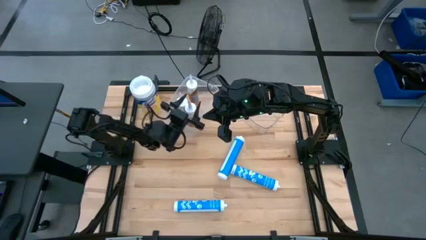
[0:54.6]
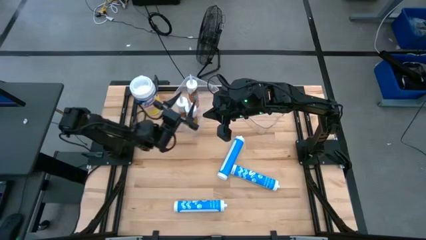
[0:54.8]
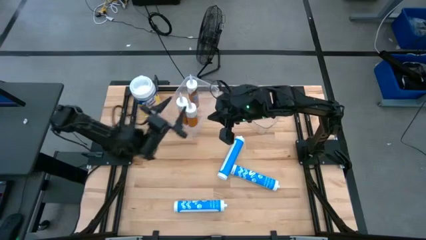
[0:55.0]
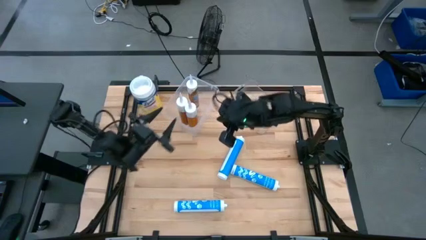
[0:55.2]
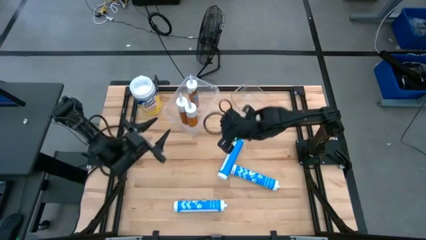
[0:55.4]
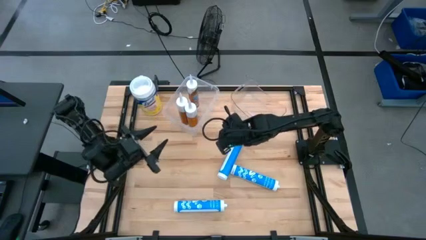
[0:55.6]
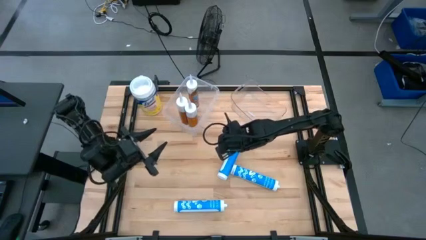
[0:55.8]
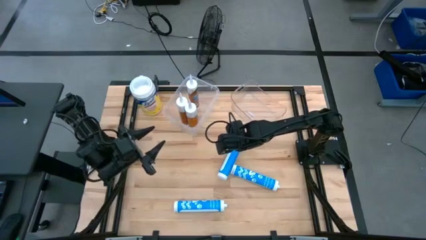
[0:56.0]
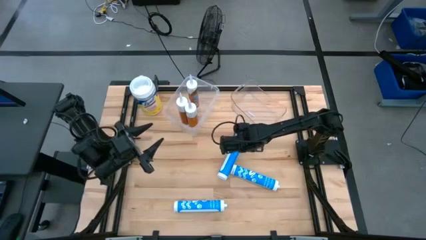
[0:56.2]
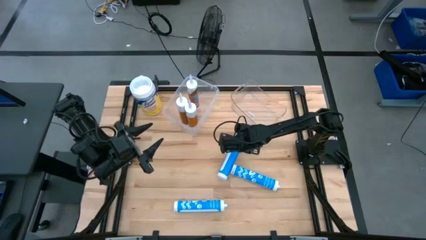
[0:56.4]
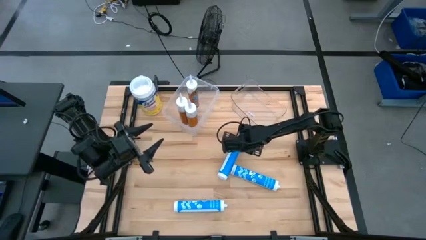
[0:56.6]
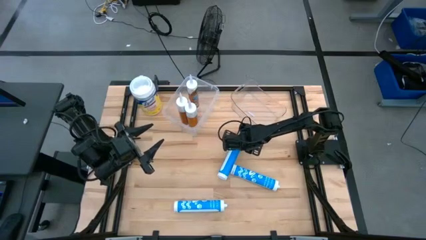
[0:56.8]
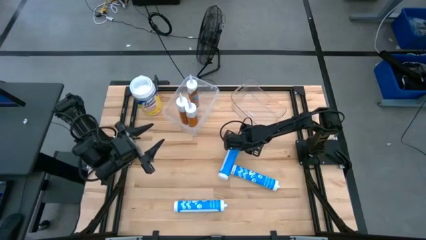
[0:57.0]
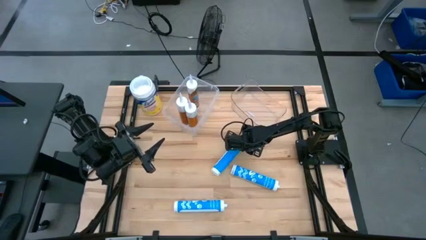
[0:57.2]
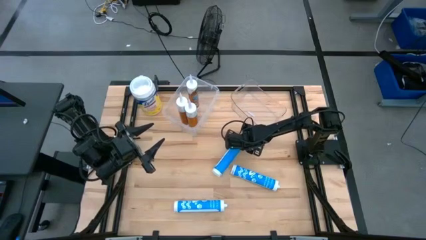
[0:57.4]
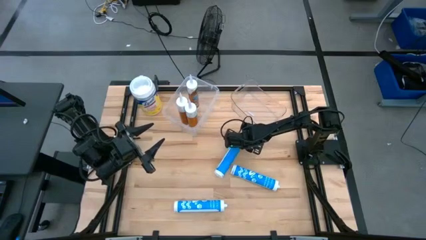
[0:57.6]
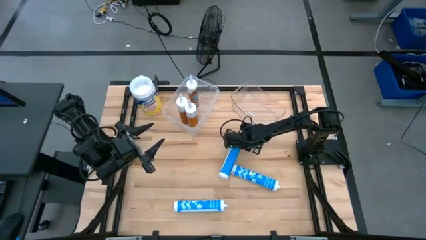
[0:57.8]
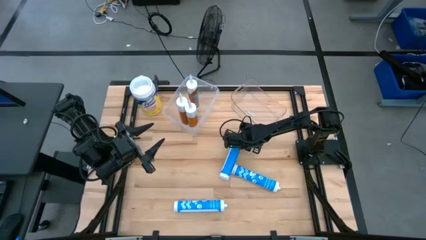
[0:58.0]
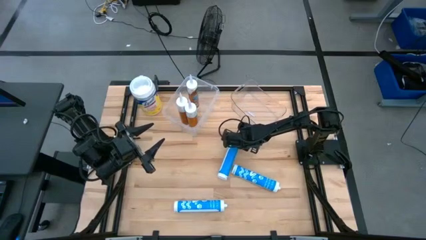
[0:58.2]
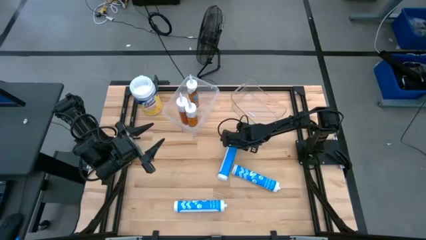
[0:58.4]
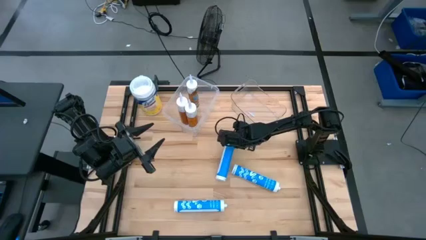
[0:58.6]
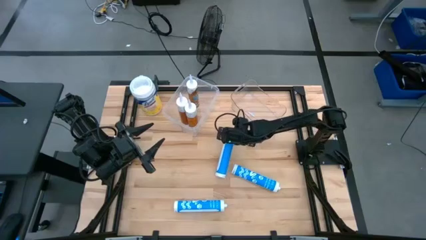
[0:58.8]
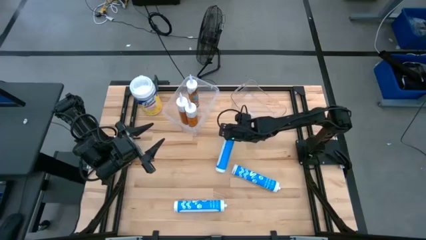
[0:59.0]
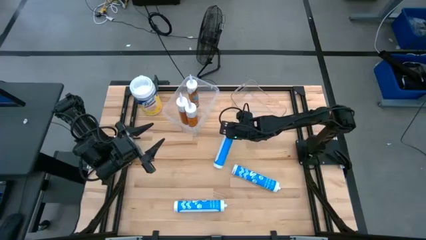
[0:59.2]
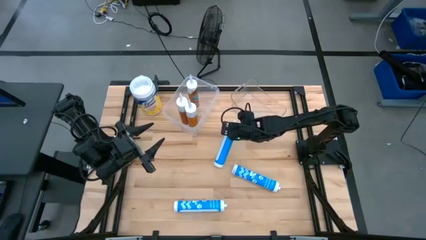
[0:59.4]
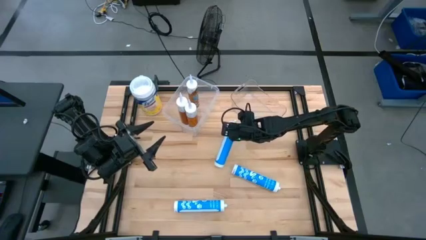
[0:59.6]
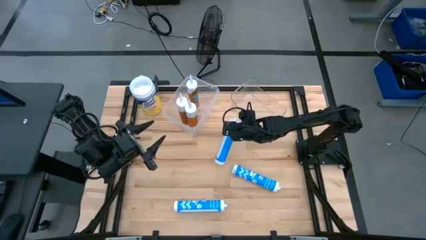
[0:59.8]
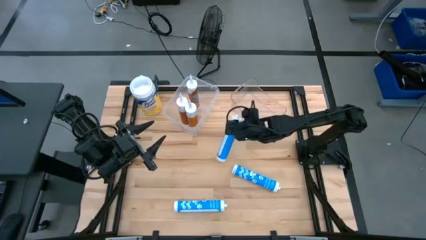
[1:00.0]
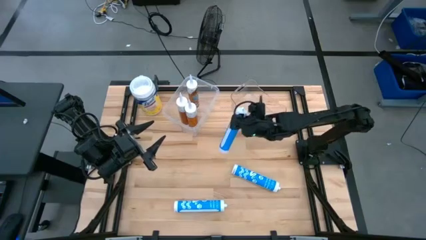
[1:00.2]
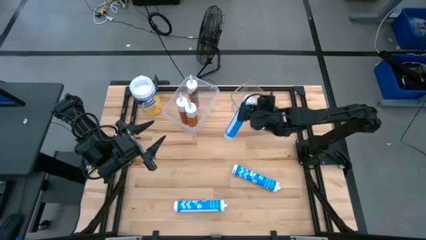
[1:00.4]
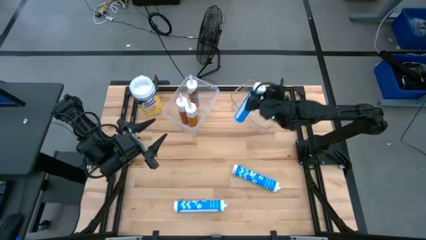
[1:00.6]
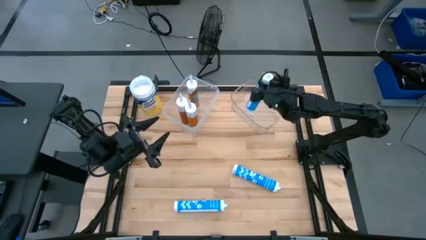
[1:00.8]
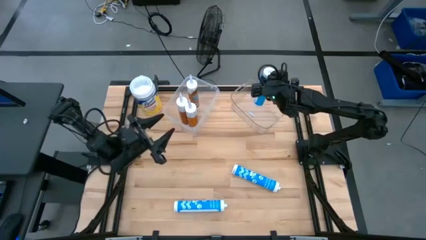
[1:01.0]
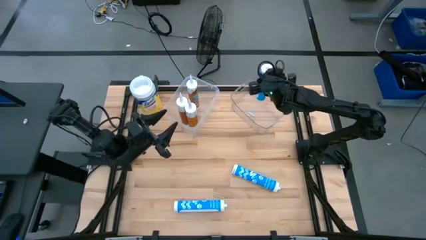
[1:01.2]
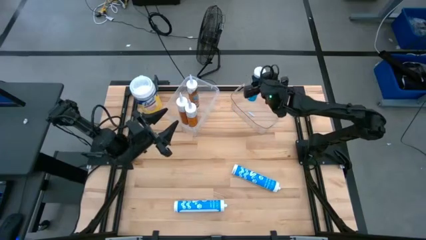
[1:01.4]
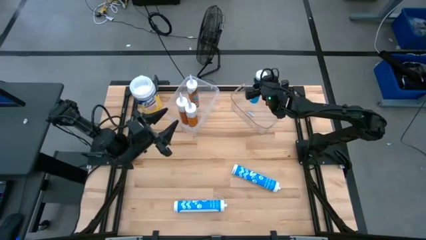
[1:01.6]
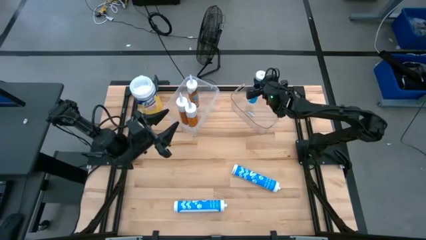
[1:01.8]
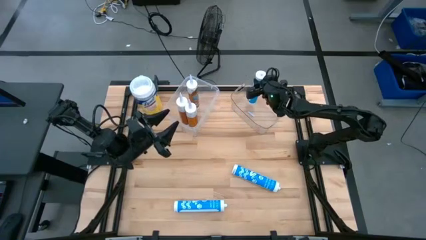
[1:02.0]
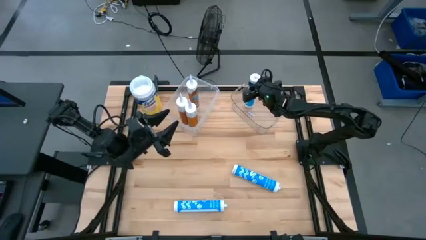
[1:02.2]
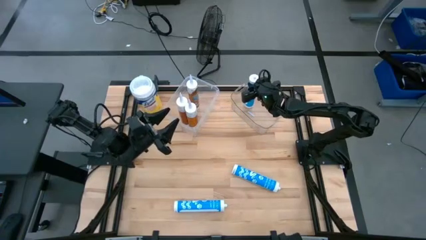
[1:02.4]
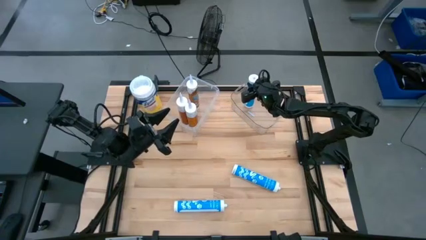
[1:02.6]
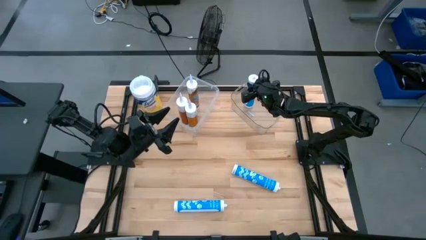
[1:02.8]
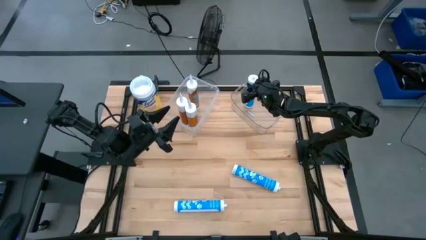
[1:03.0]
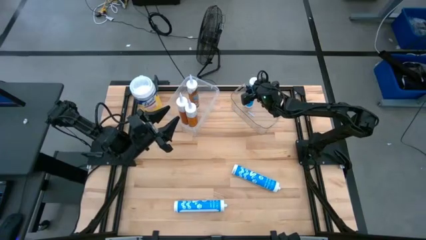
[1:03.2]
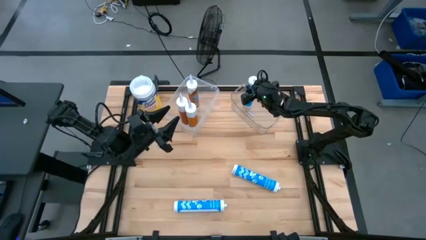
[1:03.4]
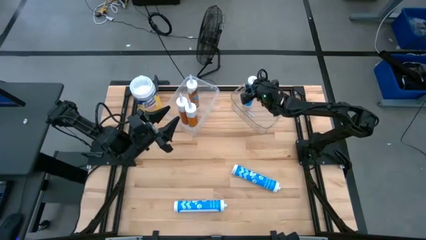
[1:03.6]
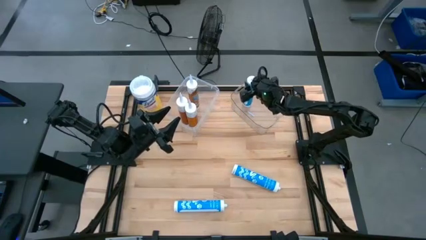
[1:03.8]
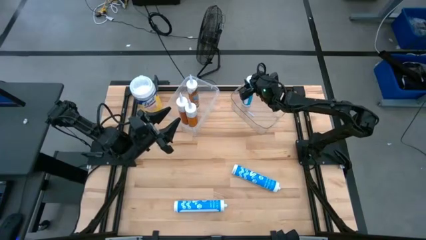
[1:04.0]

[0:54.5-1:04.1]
Task: Pick & place silicon tubes, Sealant and Lysol wipes
Put the top blue sealant into the transparent bin
